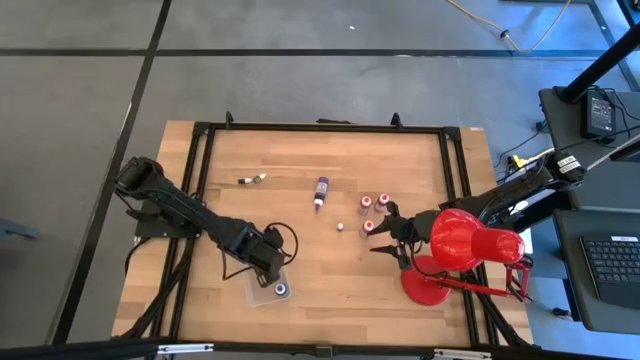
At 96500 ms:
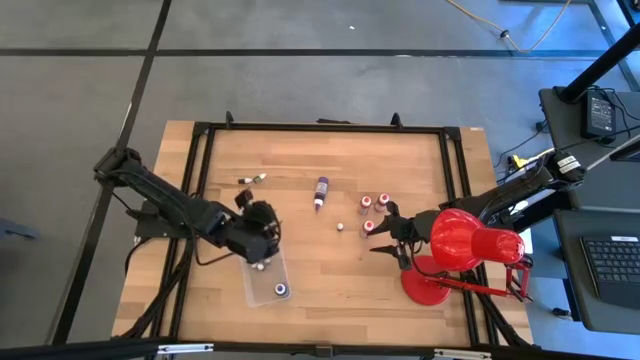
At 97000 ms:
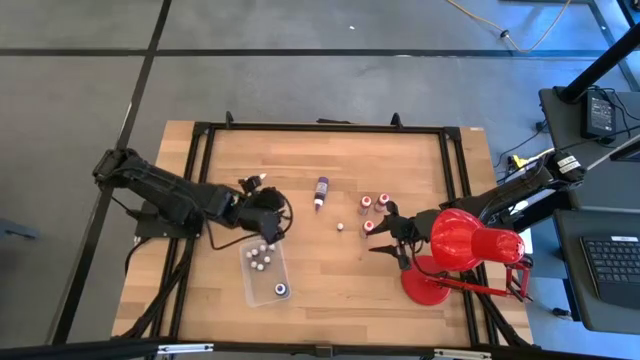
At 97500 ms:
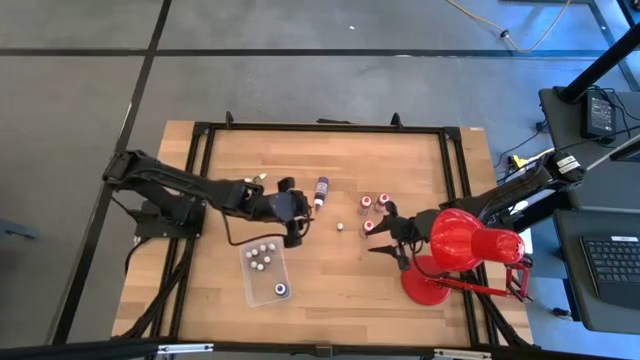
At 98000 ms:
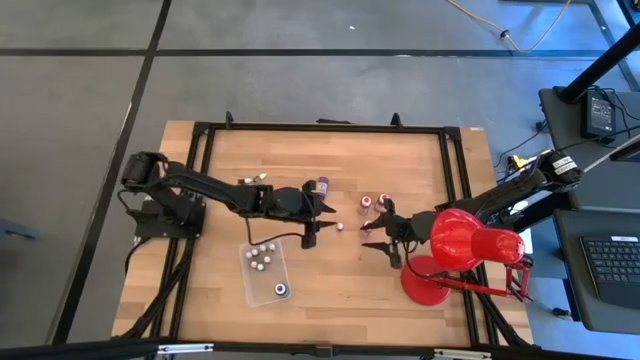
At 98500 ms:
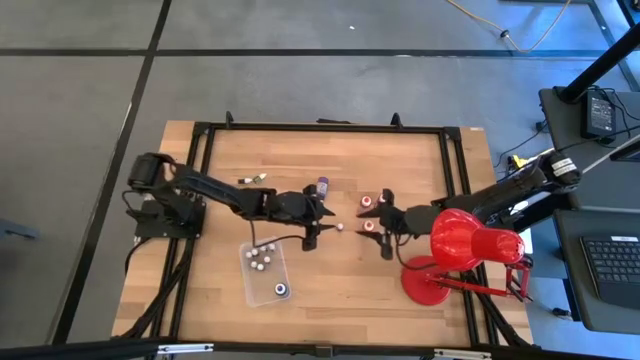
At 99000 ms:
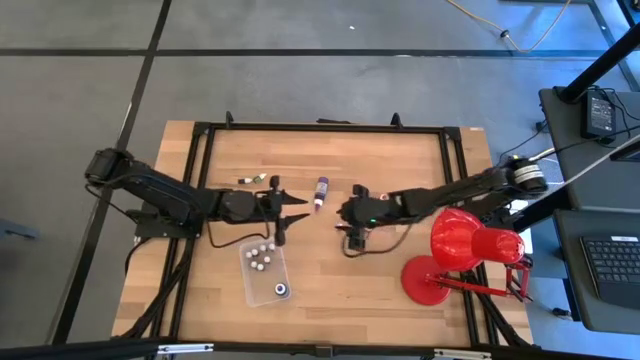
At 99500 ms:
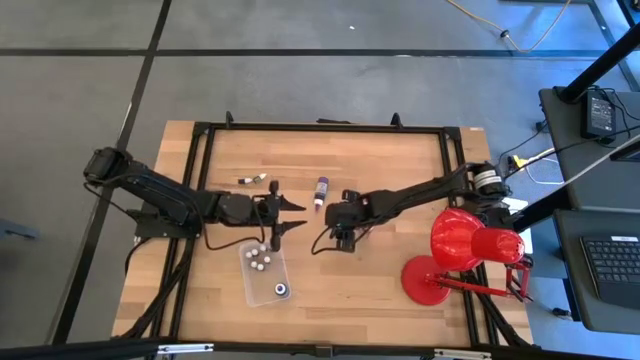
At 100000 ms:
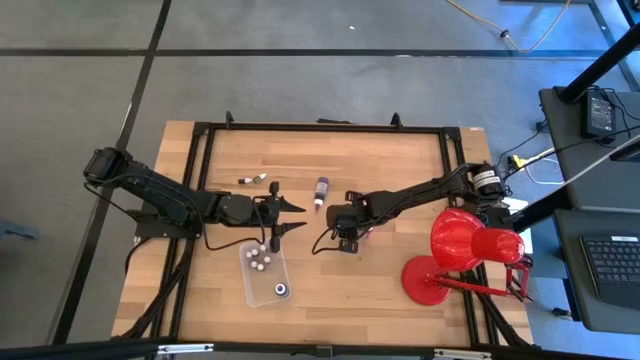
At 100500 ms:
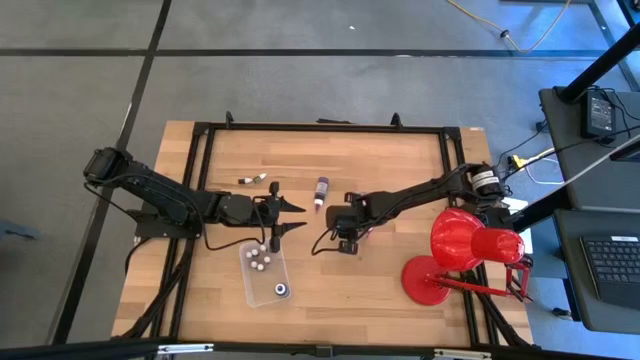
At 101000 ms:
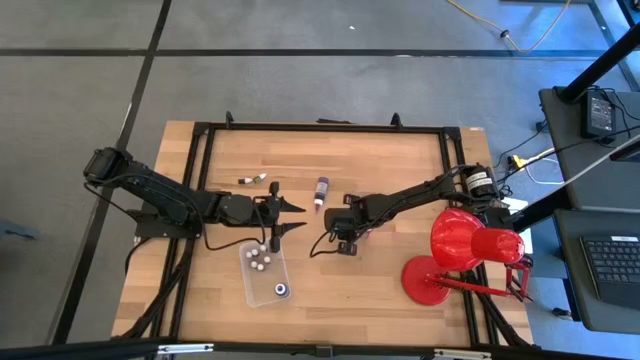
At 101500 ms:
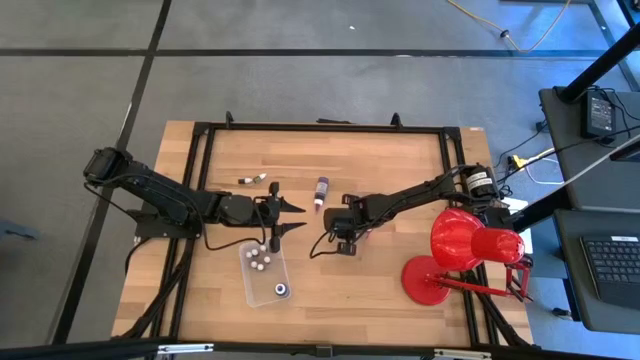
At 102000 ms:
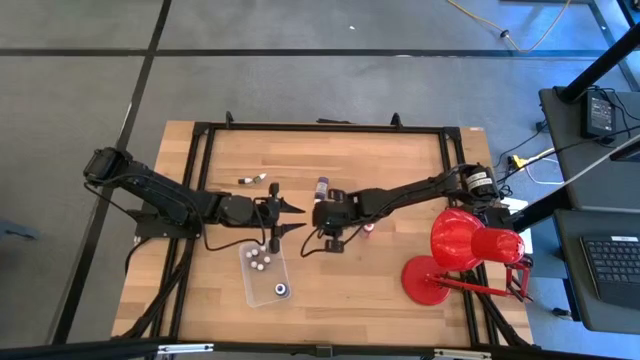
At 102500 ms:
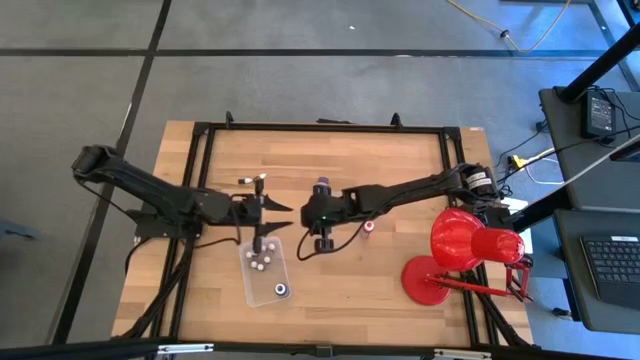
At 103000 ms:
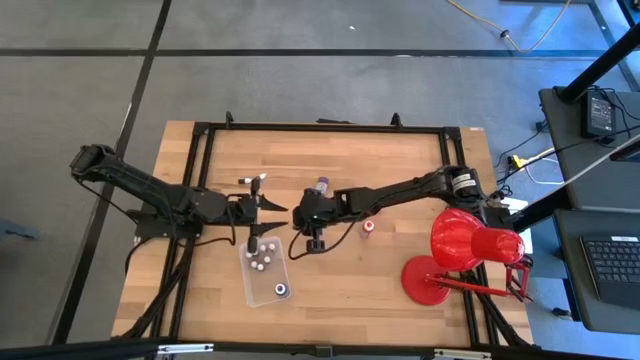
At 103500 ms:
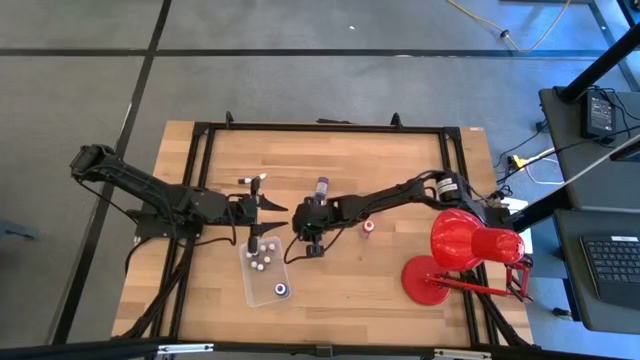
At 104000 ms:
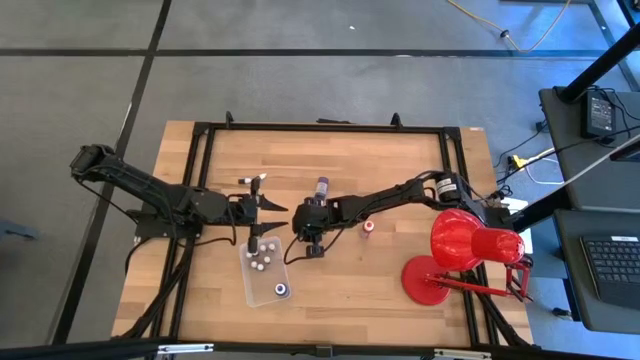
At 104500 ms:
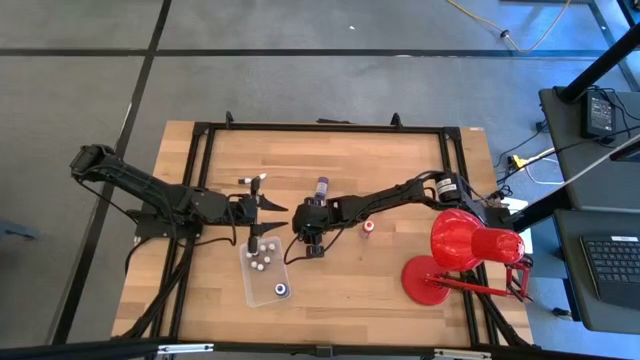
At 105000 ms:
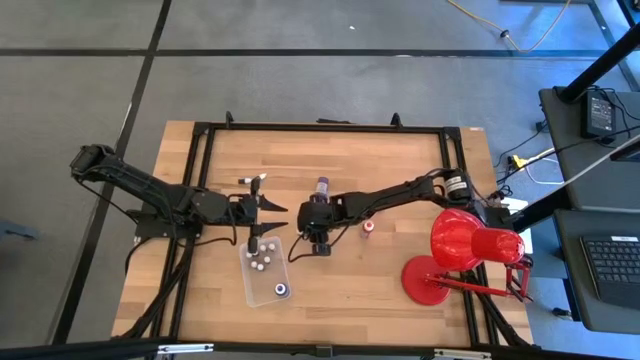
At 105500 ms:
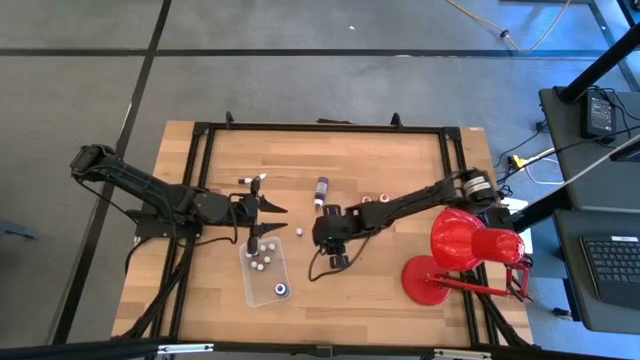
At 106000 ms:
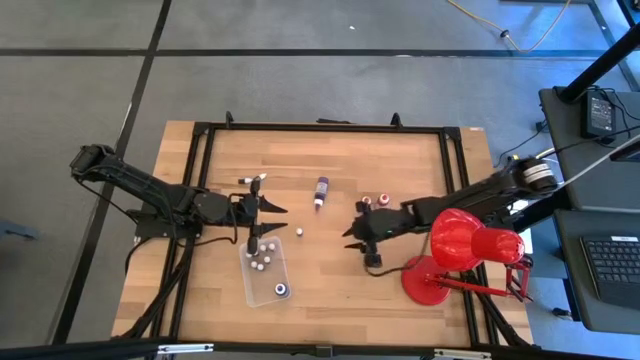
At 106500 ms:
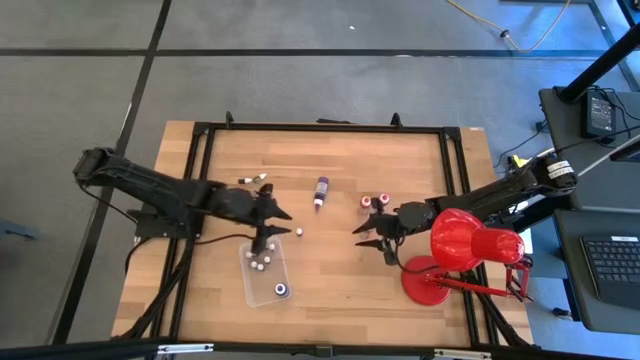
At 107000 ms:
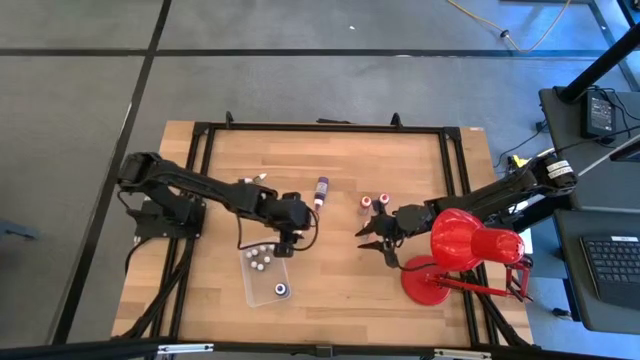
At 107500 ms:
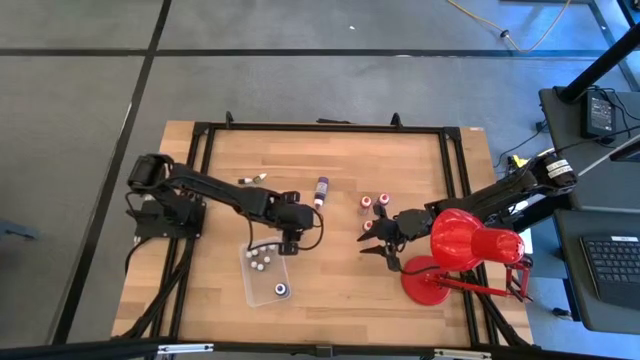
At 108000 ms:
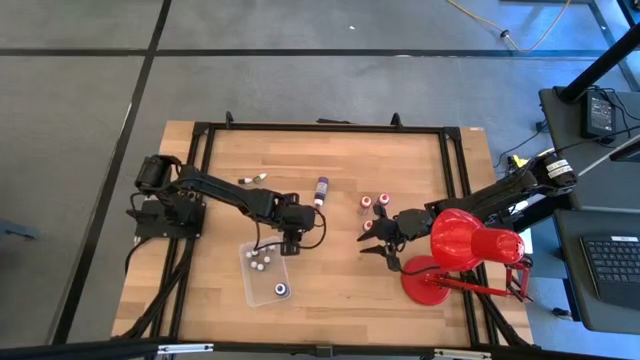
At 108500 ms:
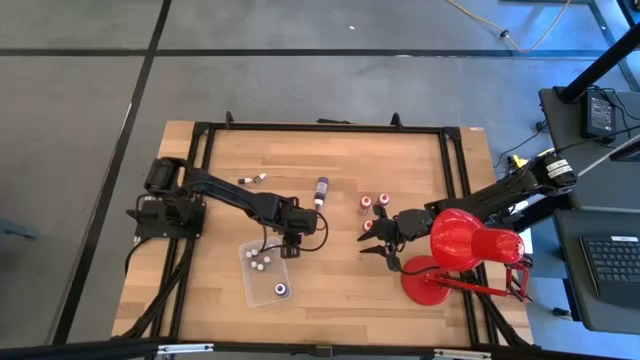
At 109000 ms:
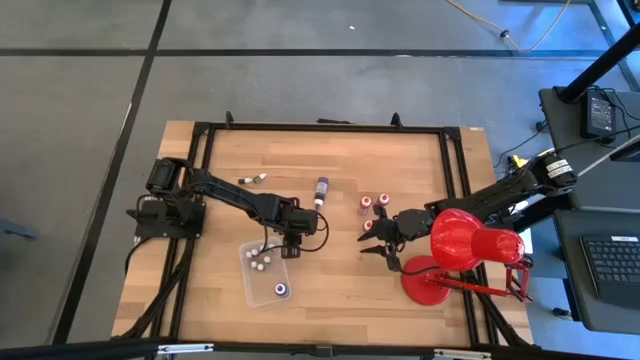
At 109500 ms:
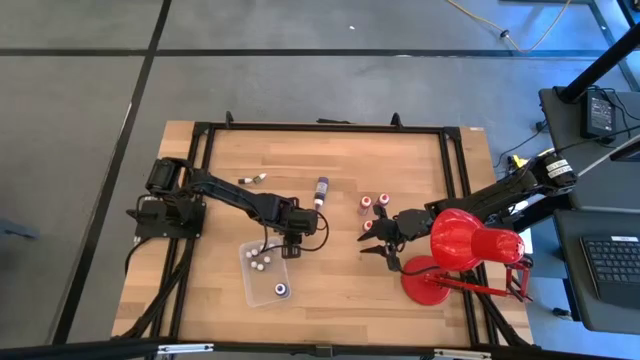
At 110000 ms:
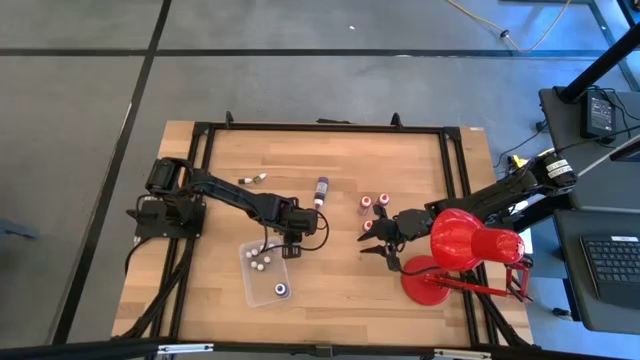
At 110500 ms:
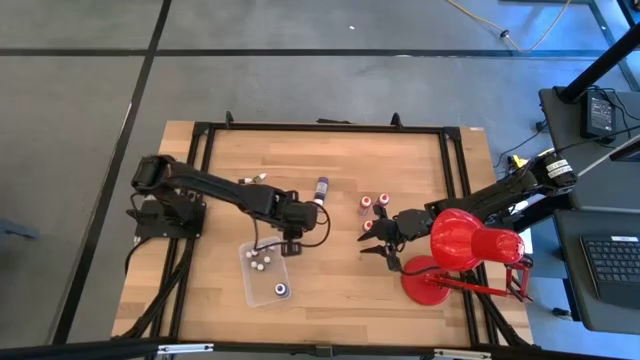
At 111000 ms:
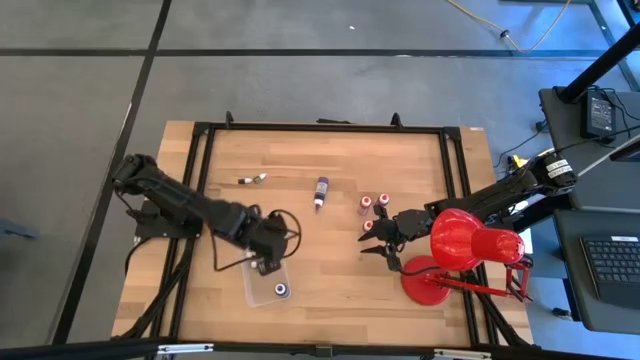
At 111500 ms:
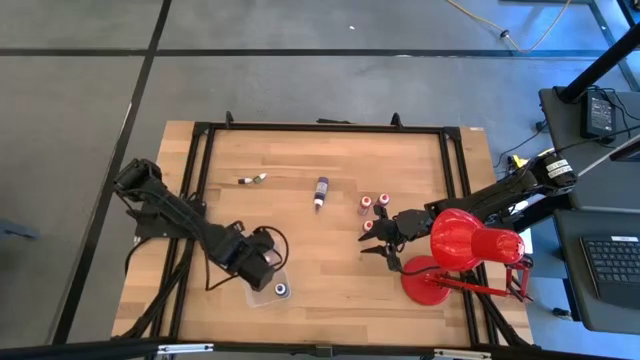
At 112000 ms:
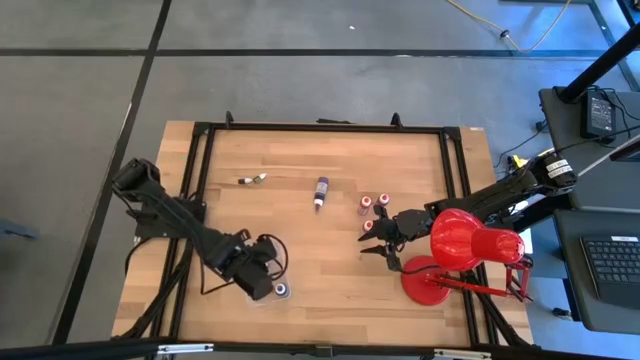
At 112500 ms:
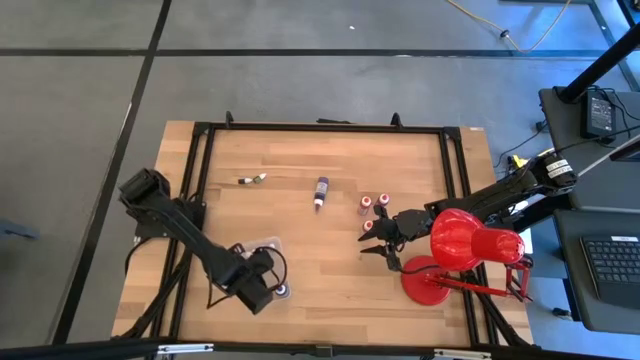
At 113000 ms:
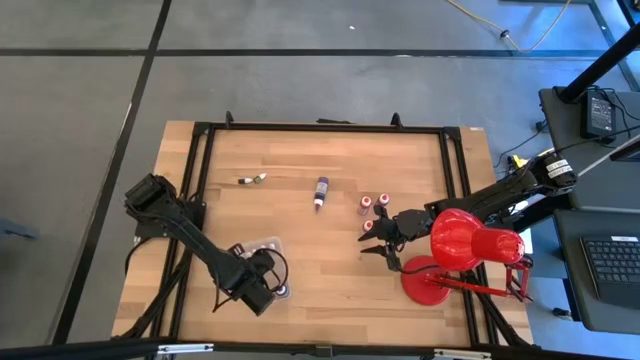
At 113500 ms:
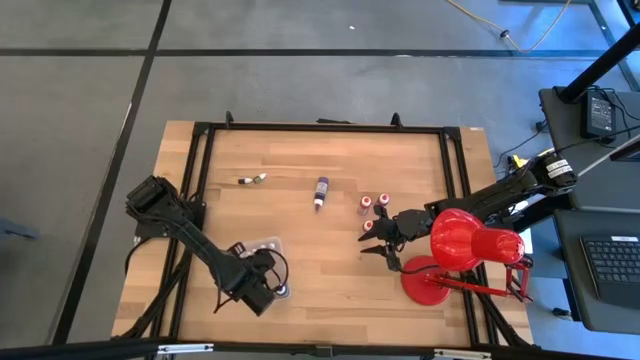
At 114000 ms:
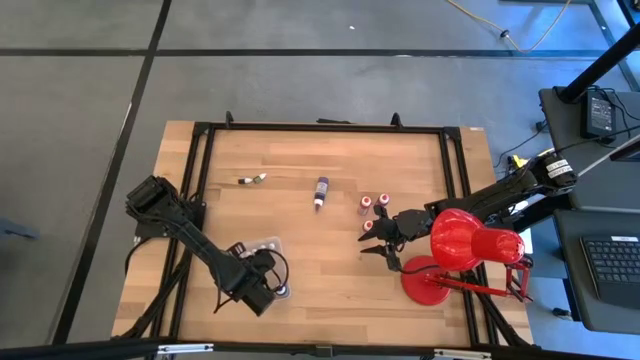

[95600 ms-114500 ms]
Task: Pick & Place food coloring
Put the small red food coloring bottle into the bin

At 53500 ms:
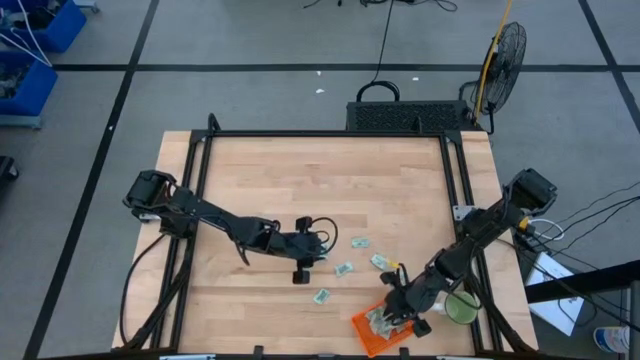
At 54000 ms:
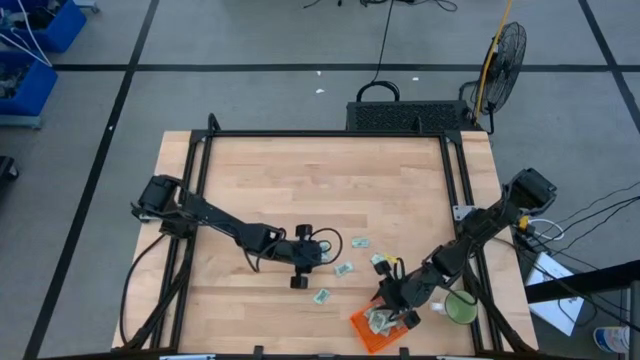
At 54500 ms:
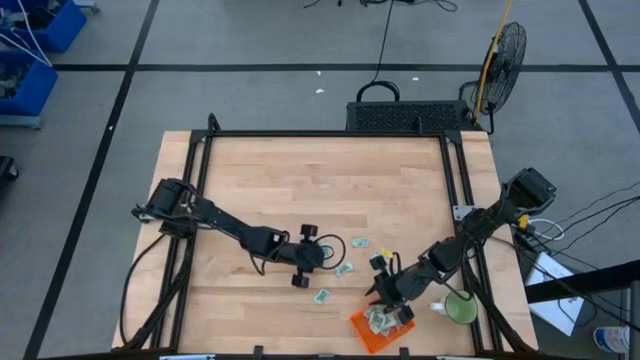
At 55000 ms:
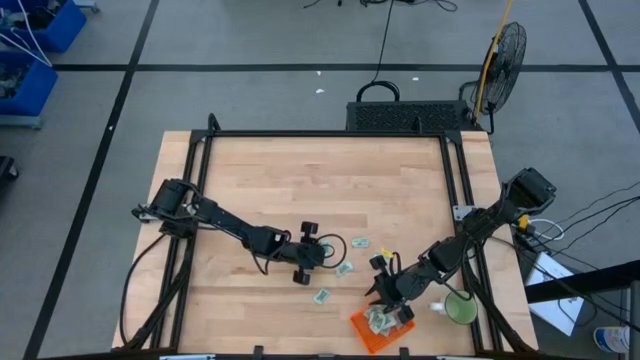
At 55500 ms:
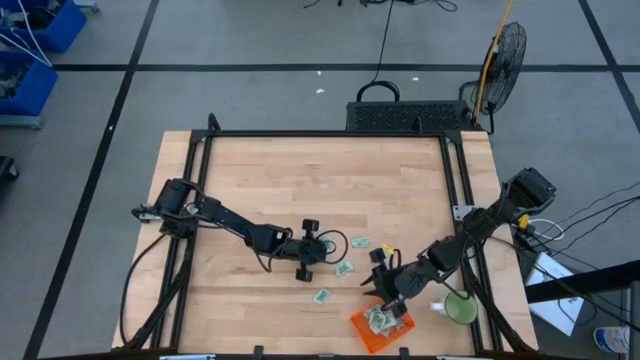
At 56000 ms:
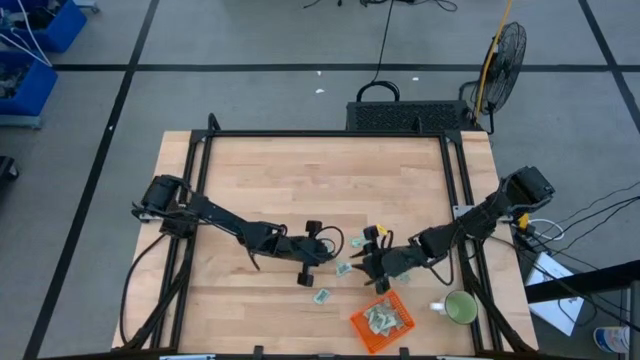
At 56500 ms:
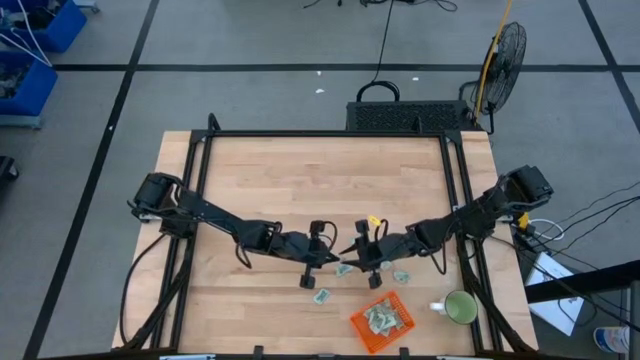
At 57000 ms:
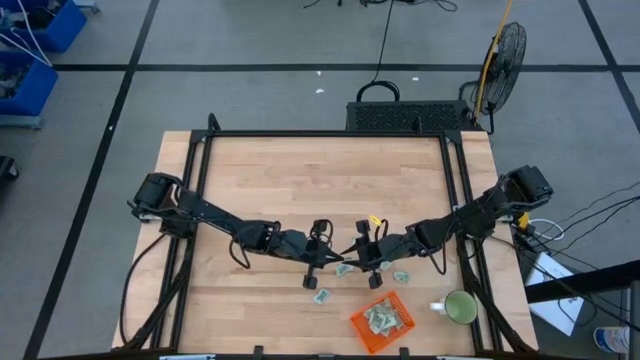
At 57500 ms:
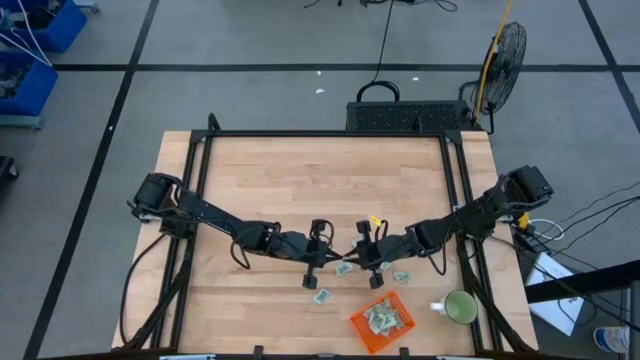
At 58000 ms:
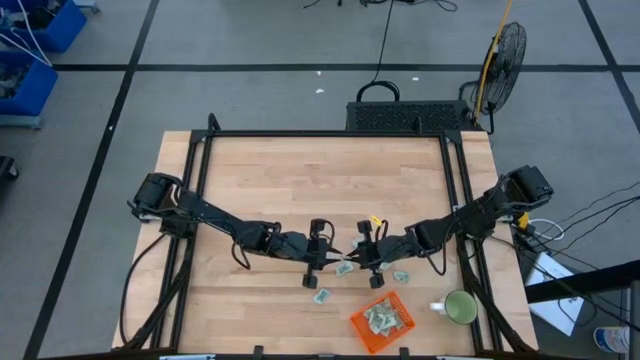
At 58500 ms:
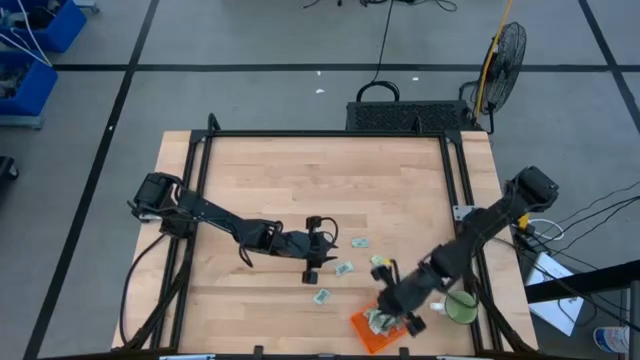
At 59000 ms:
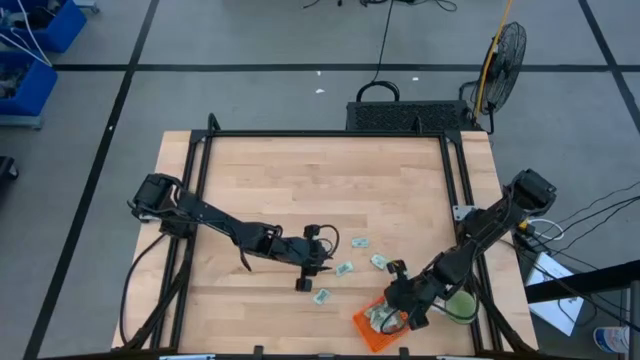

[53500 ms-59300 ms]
Task: Pick and place Stevia / Truvia into bins
Put the stevia packet into the orange bin
